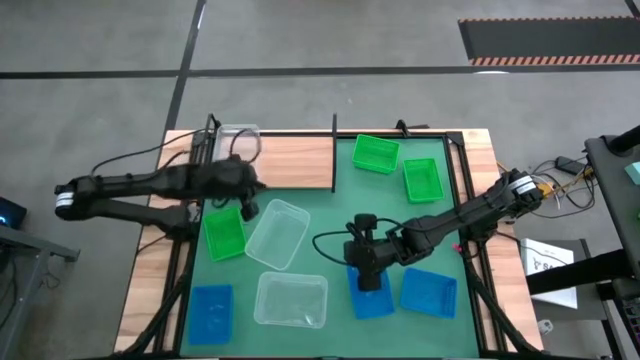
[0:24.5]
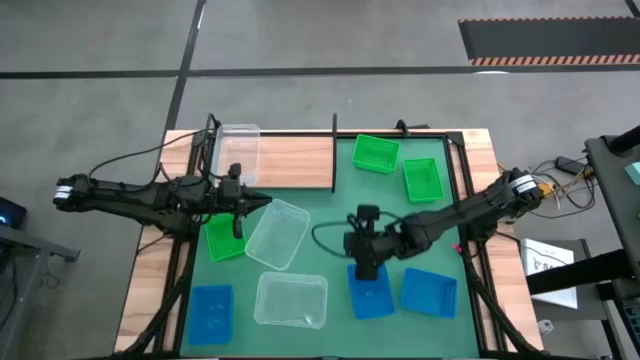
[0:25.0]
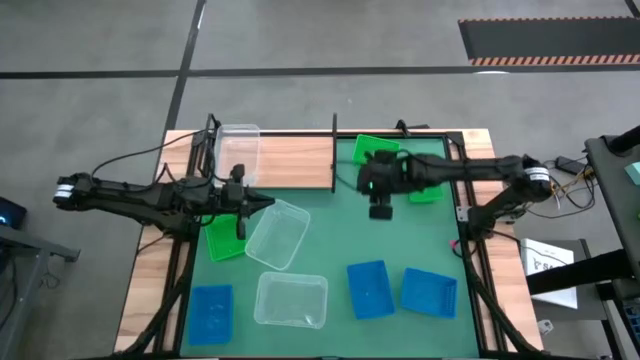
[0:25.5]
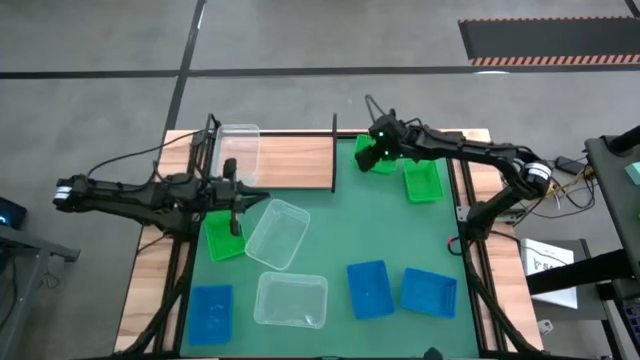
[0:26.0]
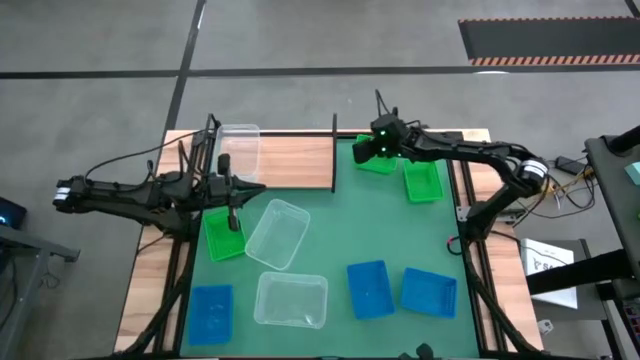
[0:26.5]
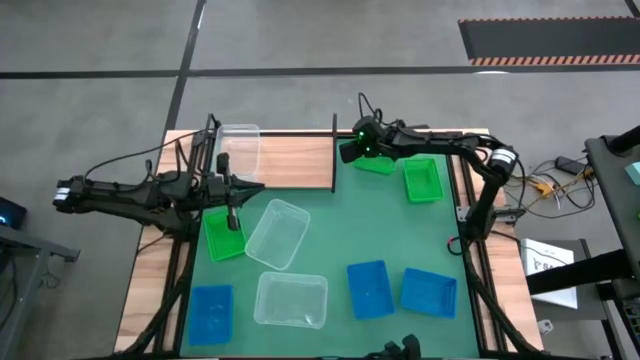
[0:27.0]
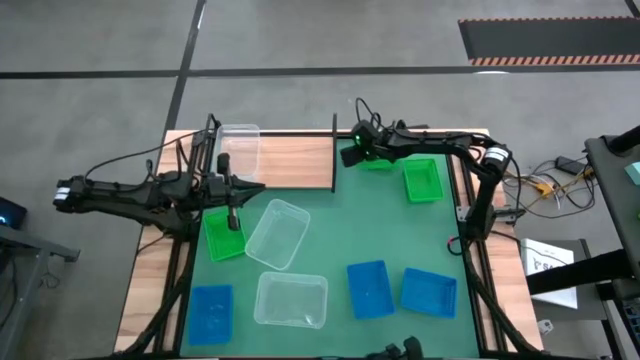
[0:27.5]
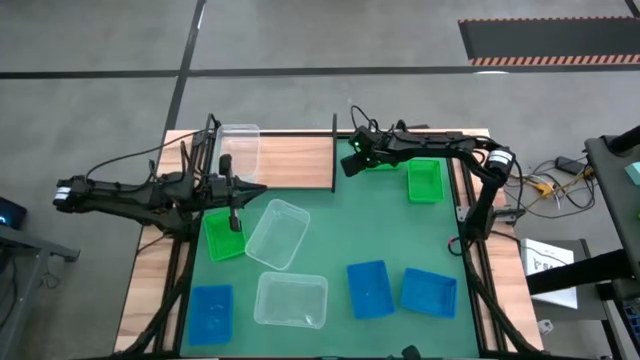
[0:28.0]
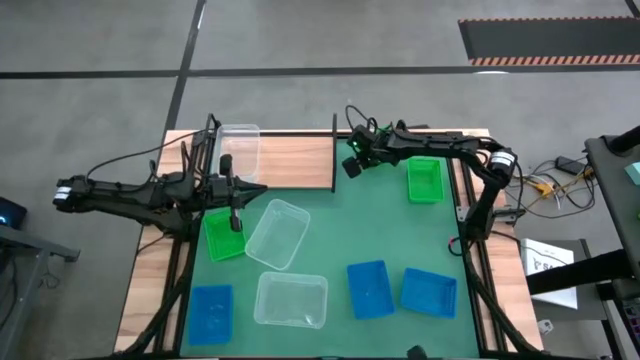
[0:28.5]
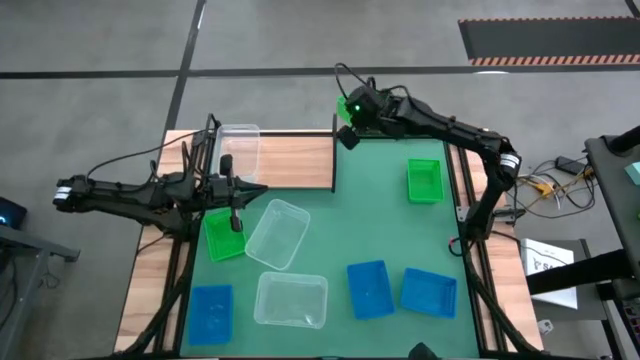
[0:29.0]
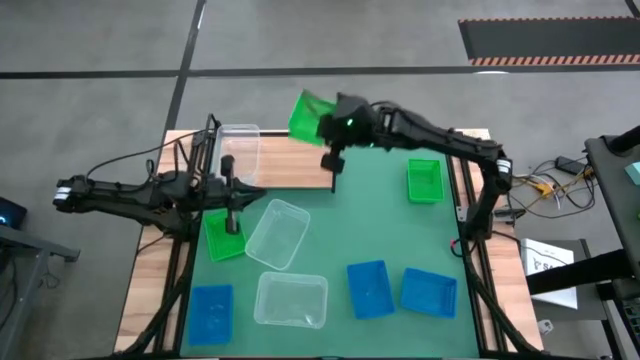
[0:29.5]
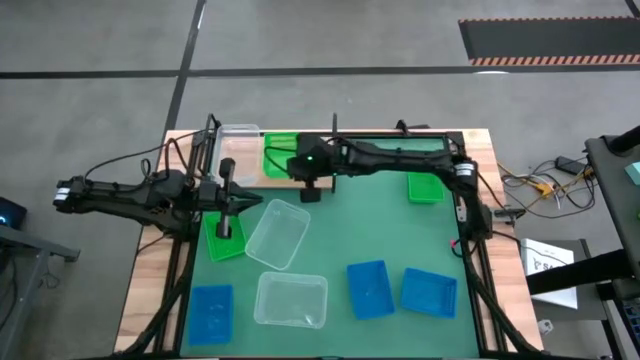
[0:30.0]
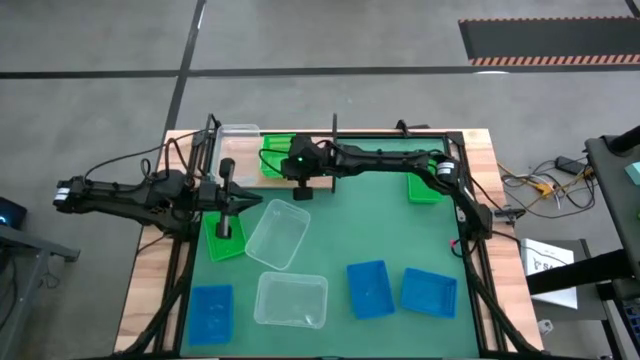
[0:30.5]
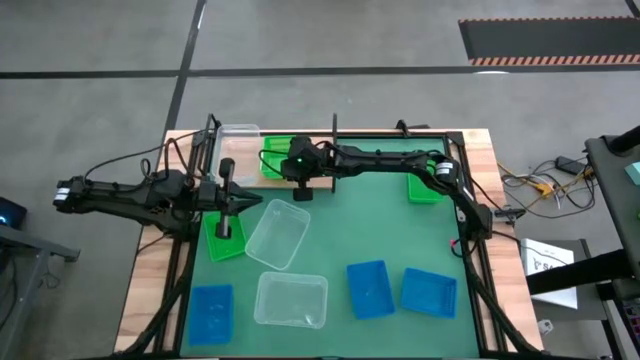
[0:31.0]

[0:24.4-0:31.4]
Task: Stack baskets on shelf by color
Put the top green bin on the shelf

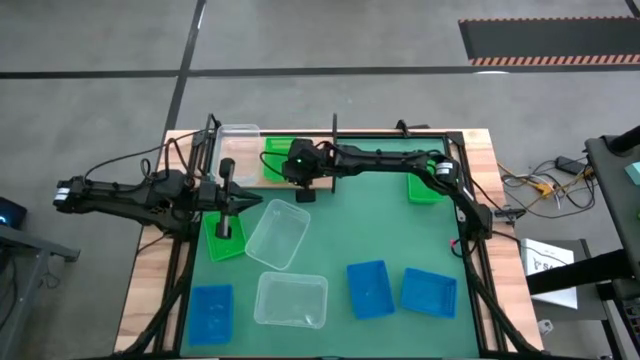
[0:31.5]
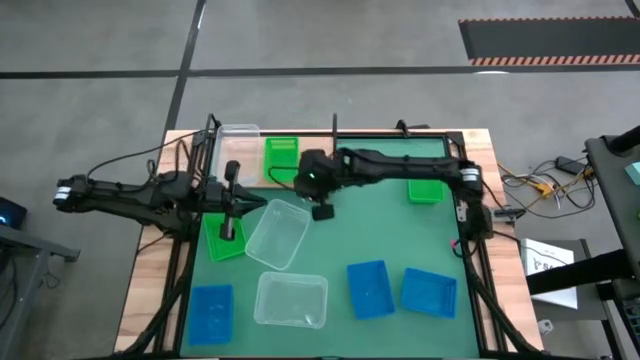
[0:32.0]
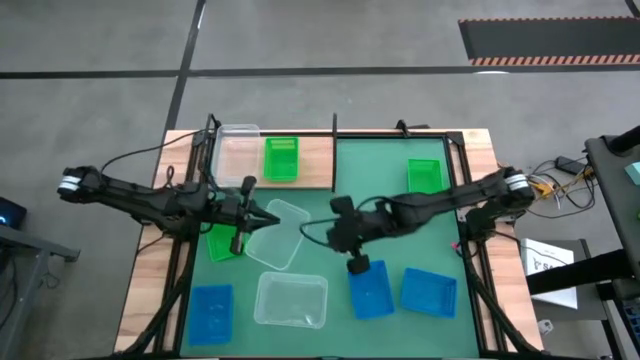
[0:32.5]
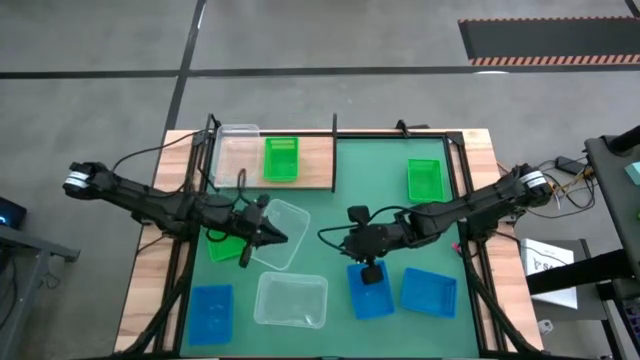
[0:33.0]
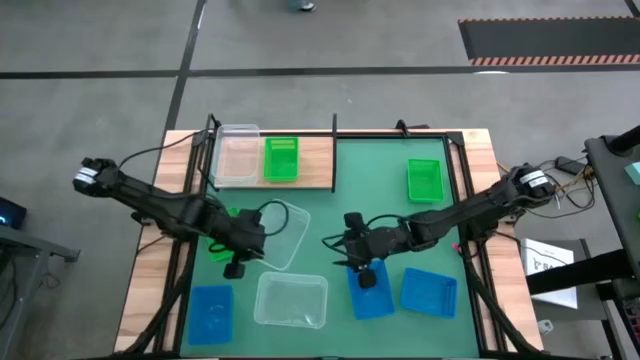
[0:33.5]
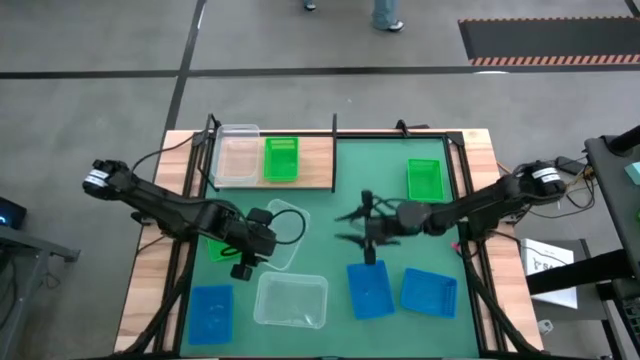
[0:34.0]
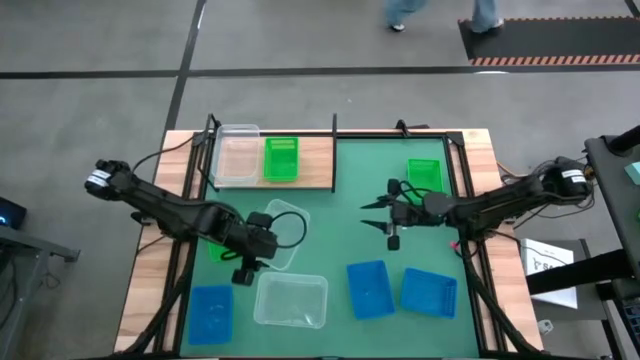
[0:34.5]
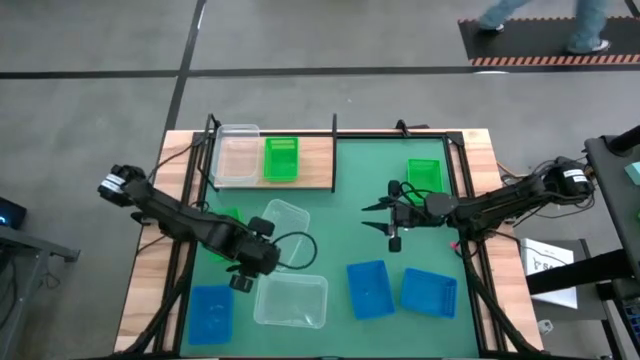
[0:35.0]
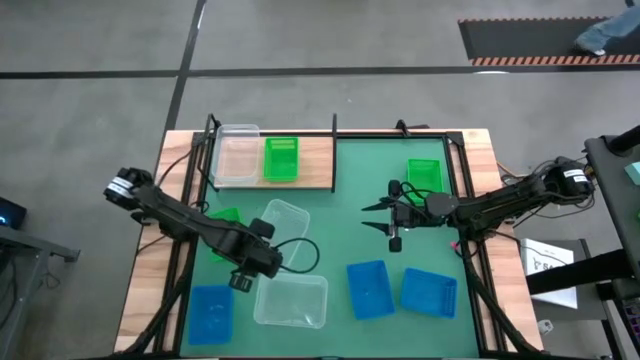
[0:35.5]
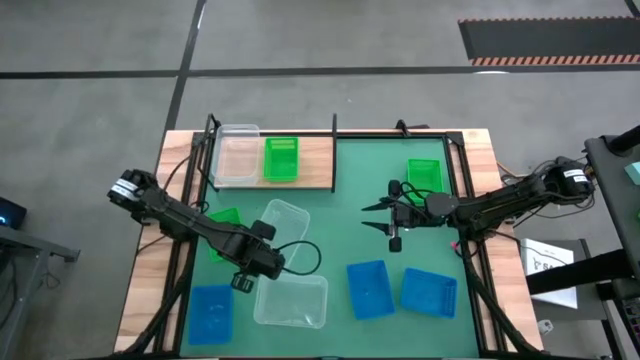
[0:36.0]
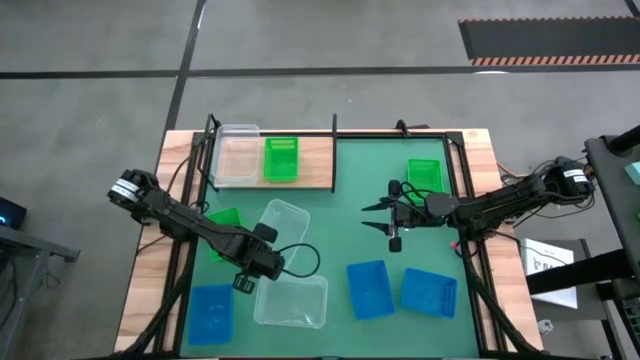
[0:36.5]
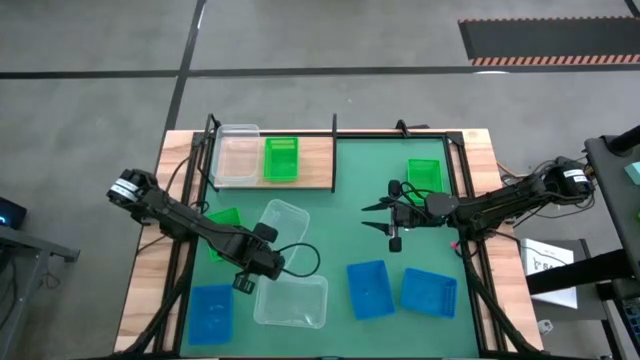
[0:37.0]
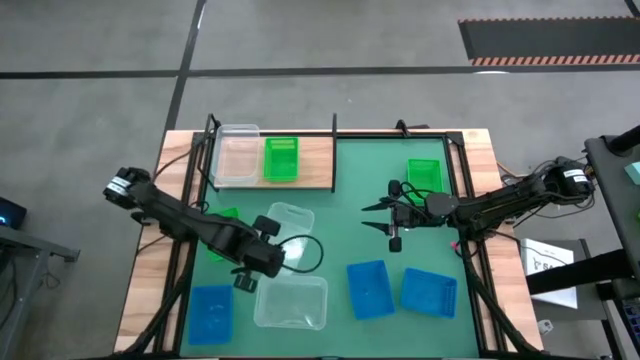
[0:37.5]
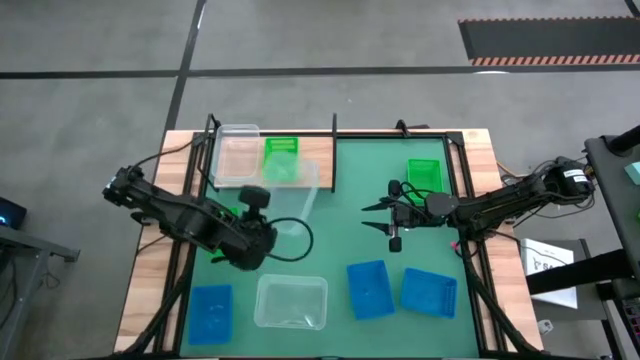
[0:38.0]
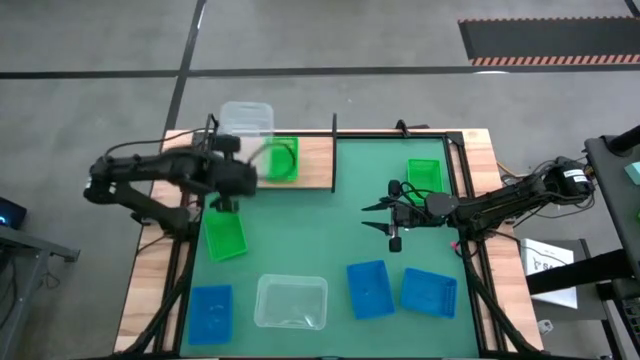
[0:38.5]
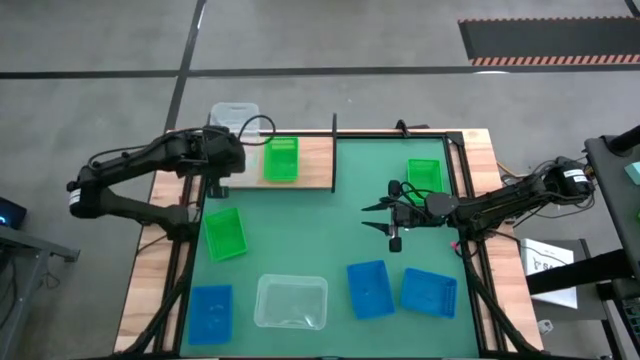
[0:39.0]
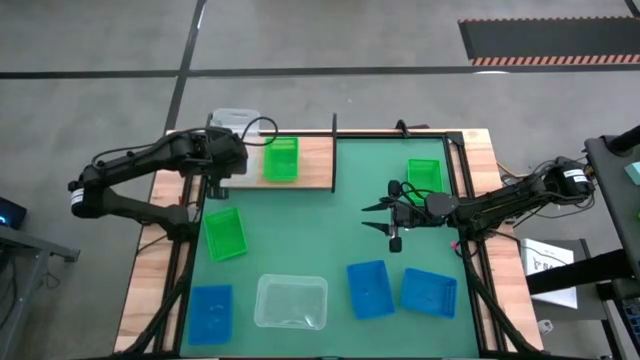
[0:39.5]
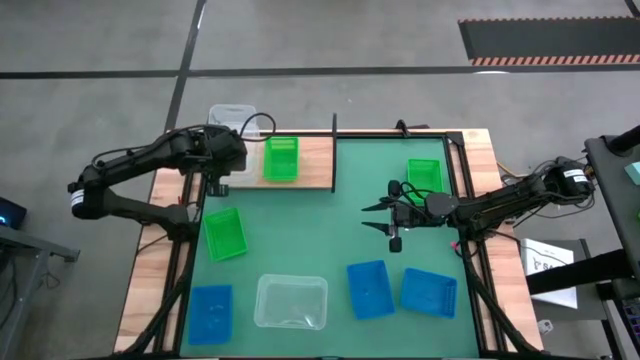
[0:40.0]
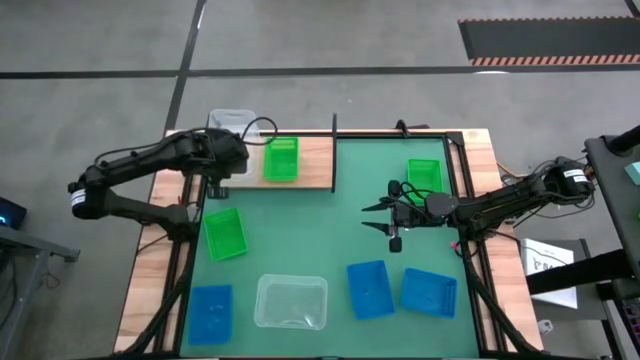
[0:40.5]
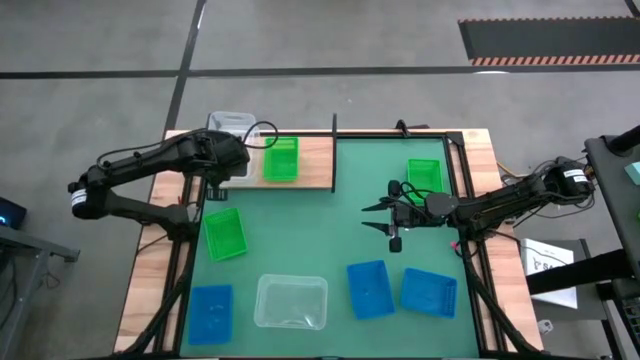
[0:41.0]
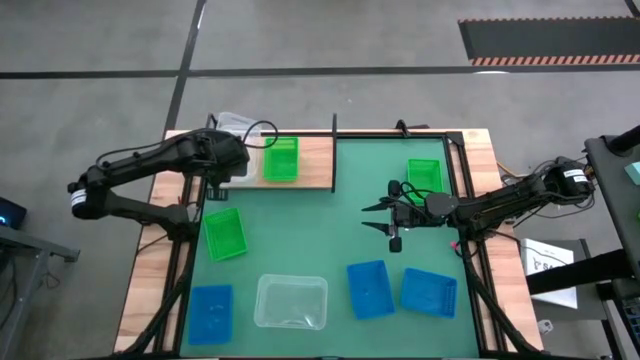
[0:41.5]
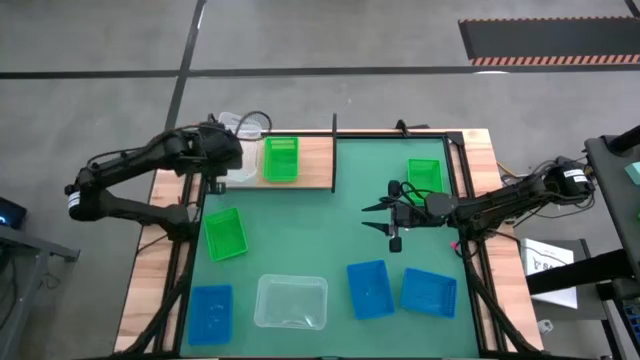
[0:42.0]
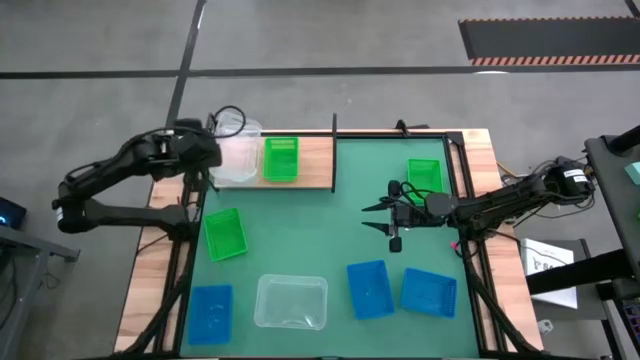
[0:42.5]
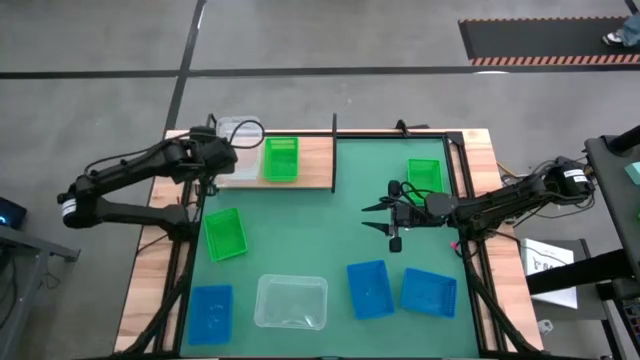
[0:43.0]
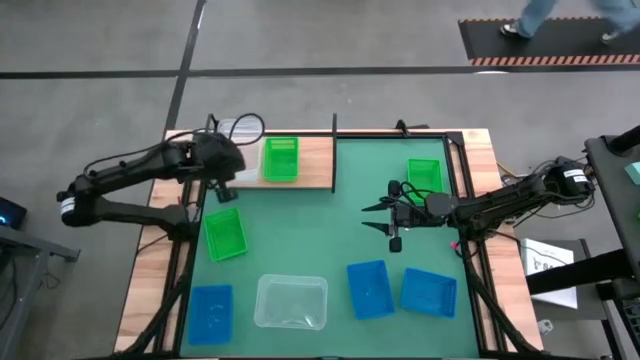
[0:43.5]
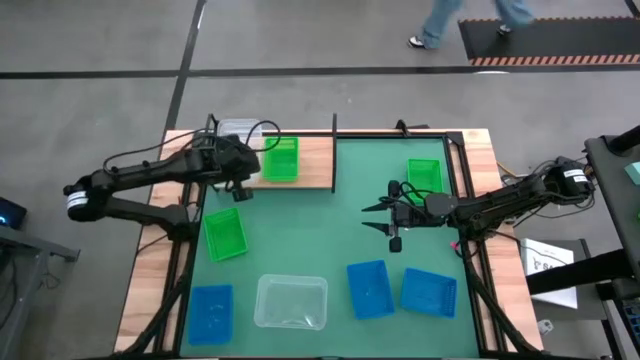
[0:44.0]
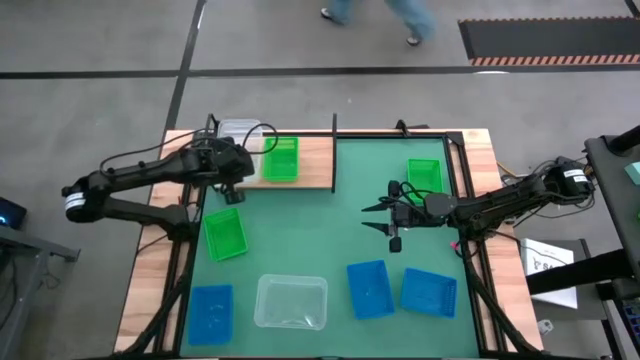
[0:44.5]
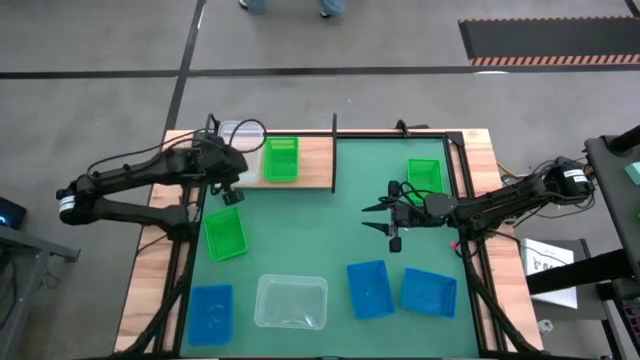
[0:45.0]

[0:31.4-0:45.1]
Stack the top transparent bin on top of the other transparent bin on the shelf
